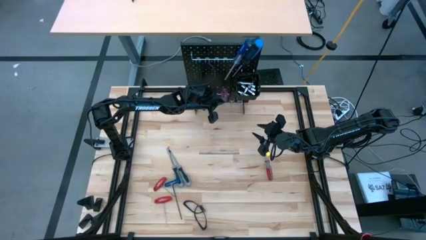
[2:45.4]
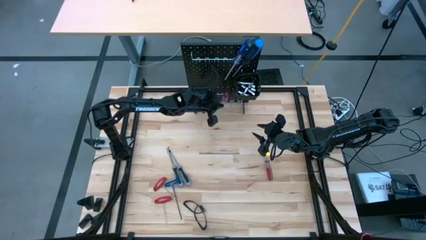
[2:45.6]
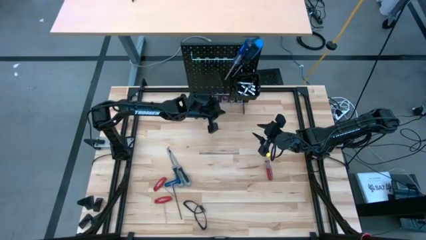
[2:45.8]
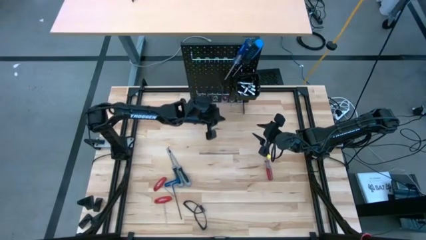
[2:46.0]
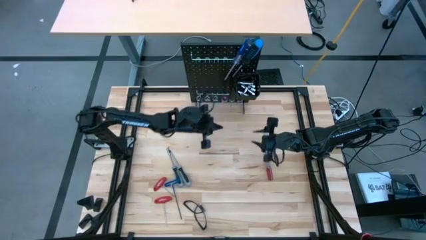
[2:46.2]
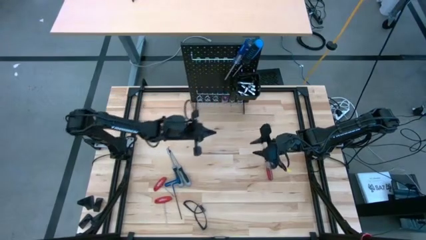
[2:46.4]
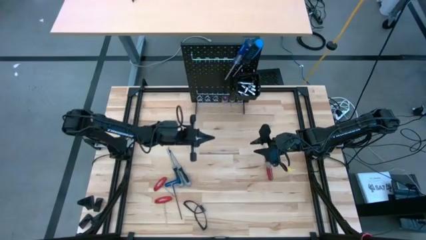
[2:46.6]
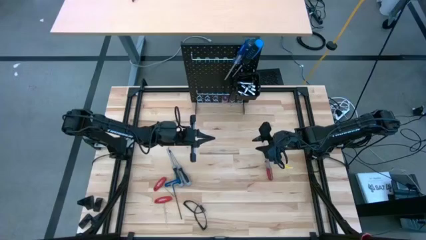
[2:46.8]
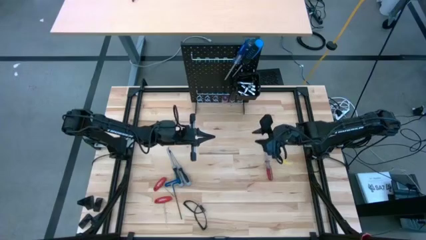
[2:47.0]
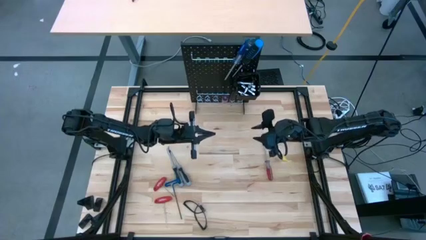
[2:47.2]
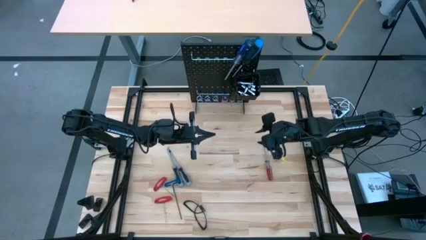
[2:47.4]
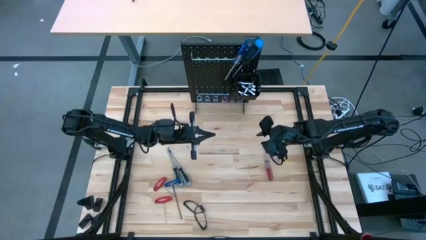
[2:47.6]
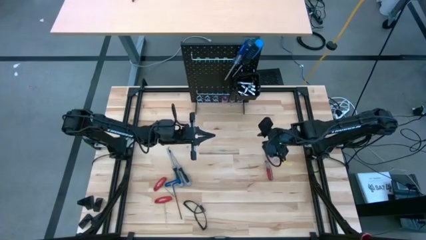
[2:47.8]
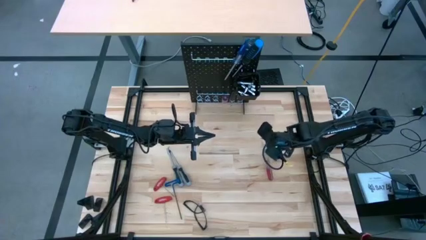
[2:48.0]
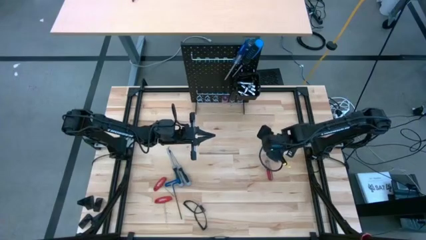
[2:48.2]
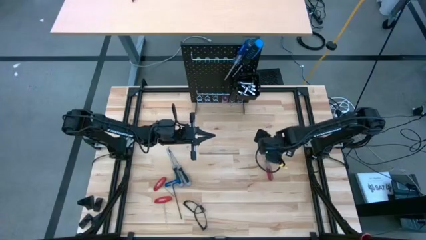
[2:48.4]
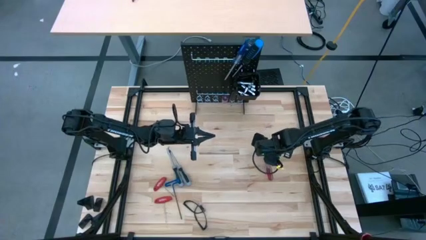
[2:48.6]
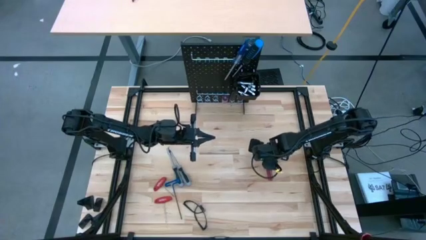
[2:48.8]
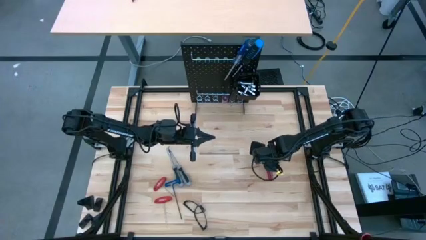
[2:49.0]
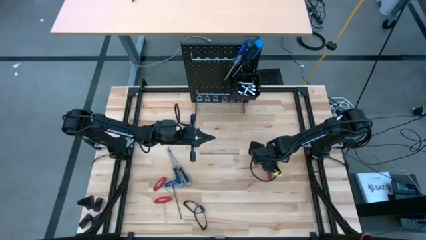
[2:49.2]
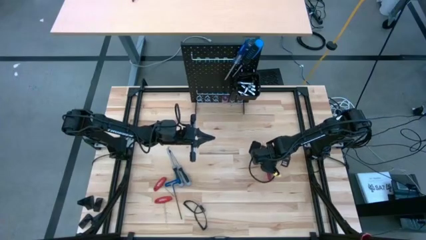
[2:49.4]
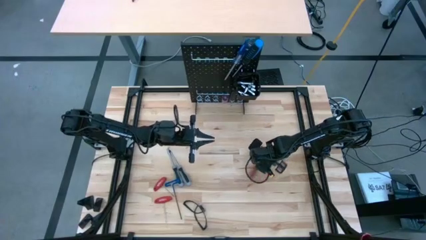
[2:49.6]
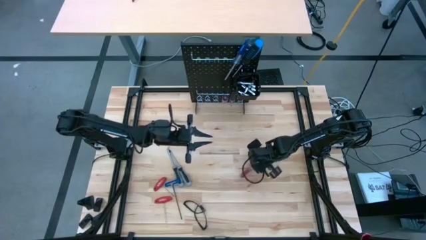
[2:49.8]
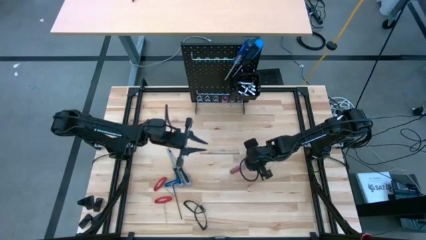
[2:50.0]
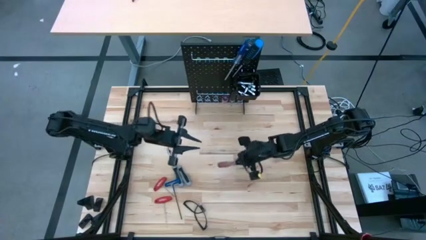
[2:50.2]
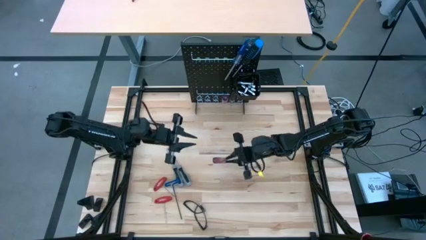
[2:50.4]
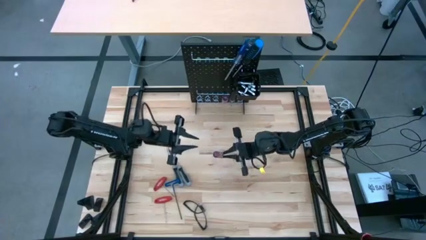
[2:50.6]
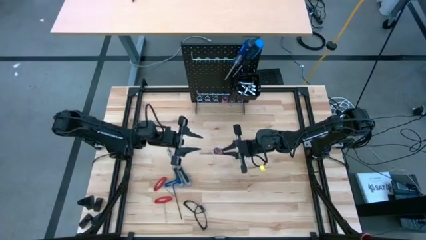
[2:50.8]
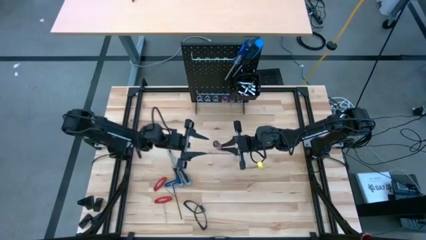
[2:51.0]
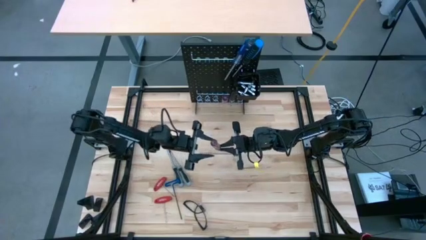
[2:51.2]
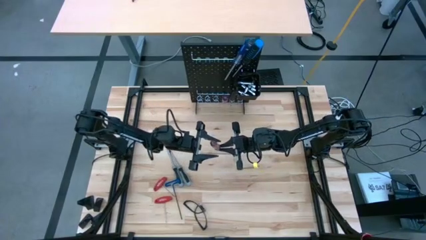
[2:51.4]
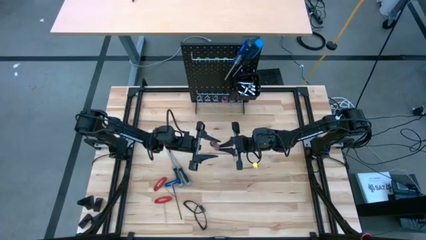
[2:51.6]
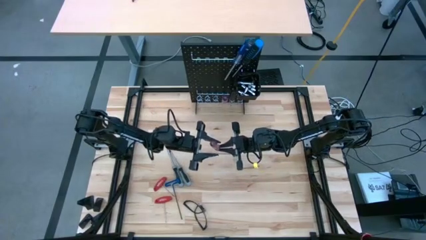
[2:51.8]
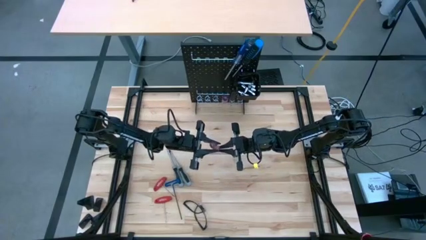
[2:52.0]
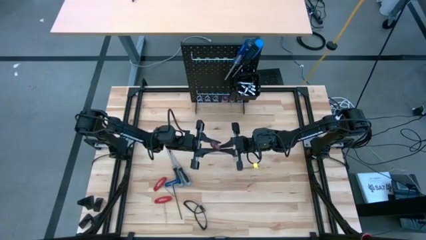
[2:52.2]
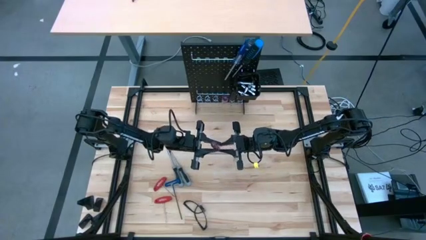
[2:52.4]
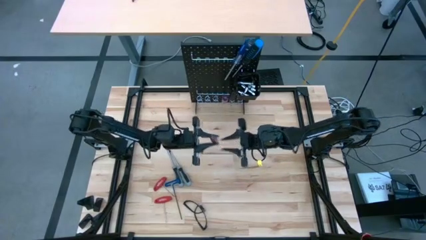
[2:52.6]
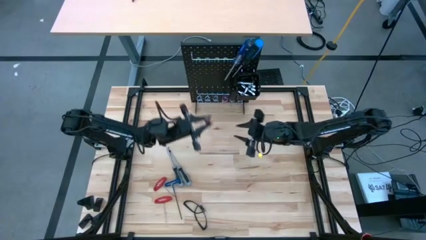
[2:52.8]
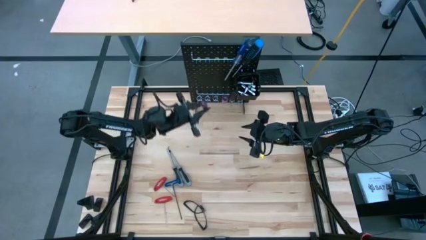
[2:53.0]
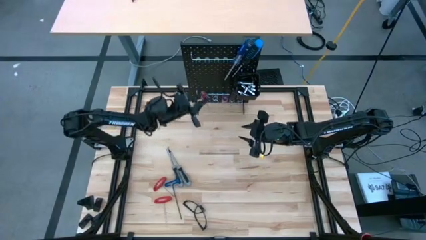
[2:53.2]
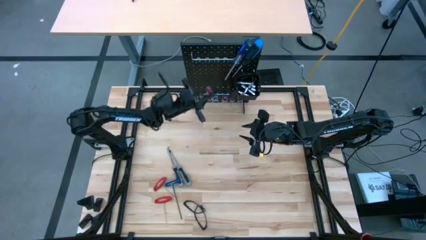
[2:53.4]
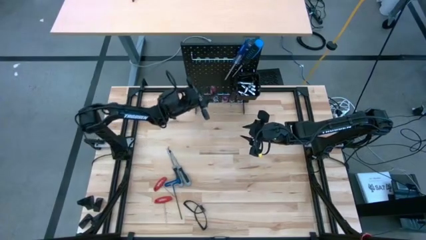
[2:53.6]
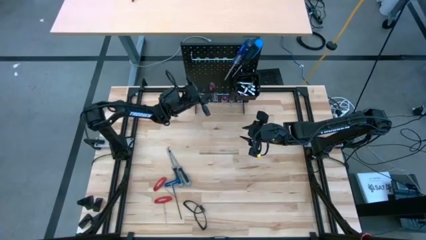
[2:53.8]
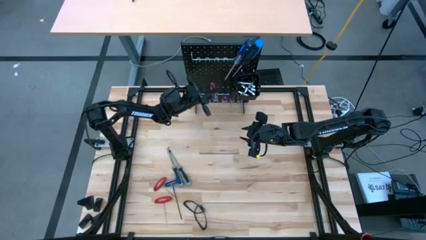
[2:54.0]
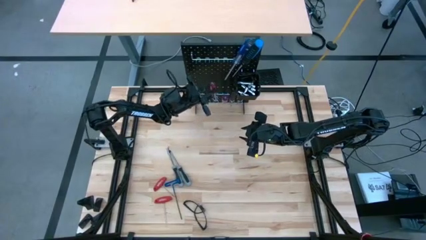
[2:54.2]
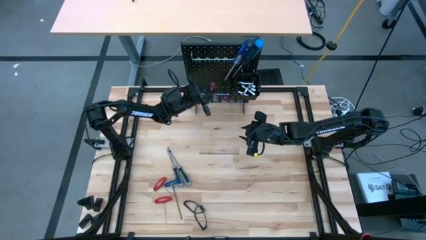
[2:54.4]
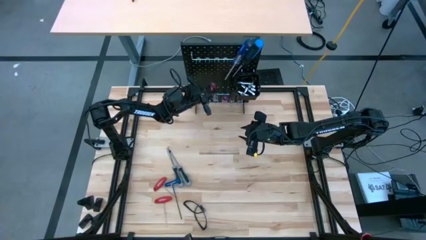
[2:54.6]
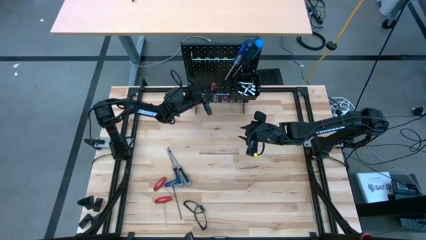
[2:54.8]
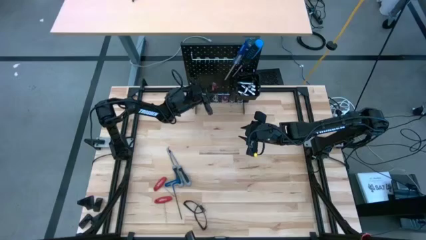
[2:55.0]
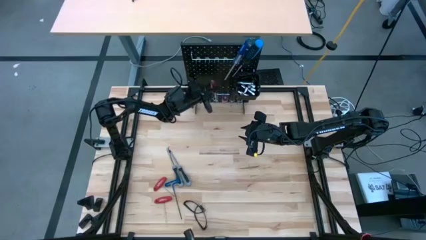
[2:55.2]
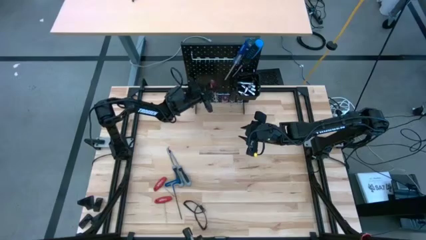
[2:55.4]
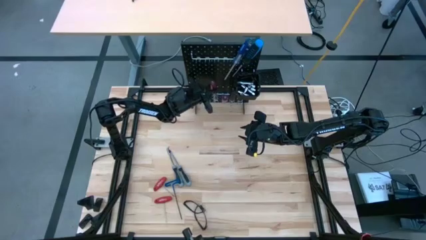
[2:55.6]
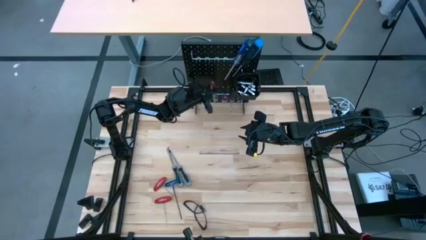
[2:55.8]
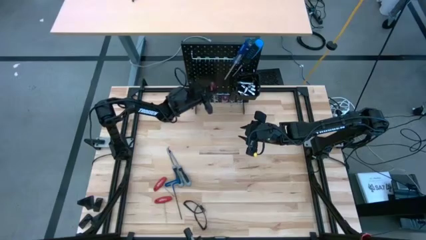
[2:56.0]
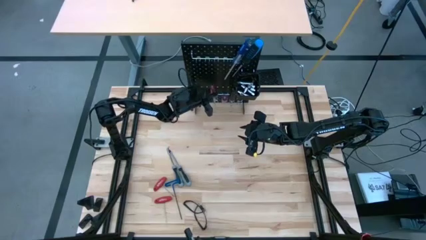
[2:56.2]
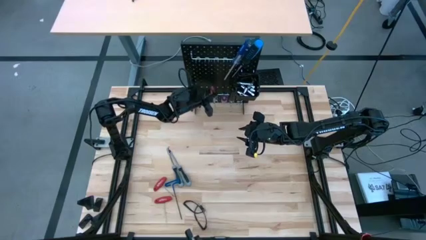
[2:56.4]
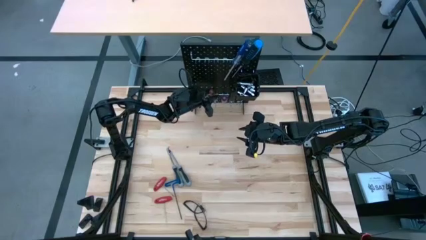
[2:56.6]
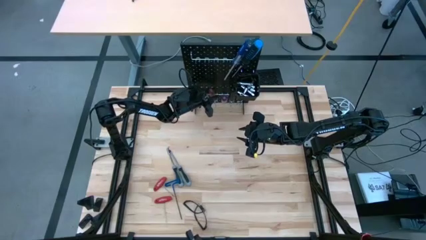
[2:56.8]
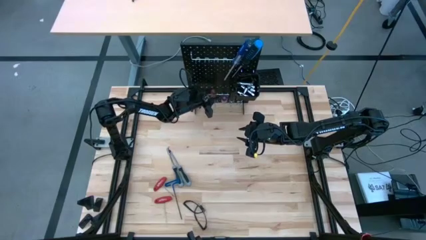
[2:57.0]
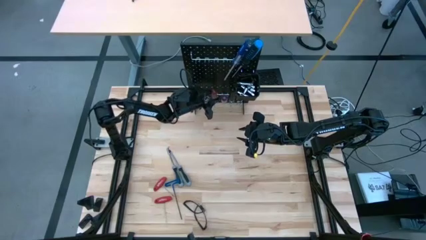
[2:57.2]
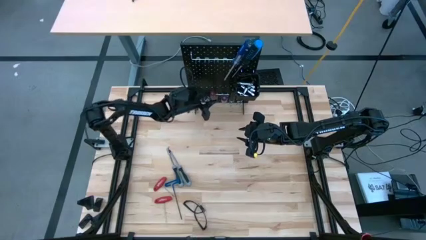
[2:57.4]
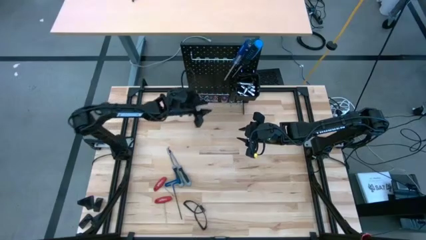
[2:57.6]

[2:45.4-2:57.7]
Task: Hang tools onto peg board
Hang the red screwdriver on the pegboard

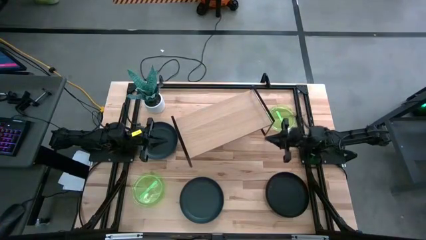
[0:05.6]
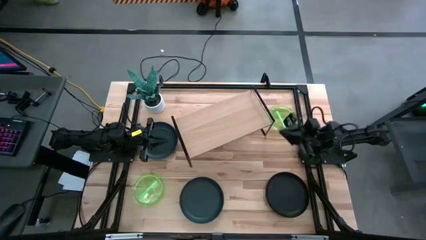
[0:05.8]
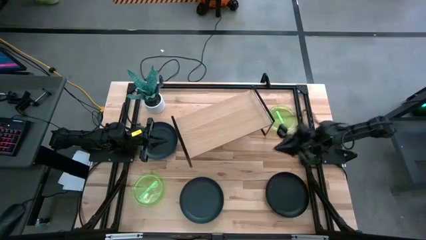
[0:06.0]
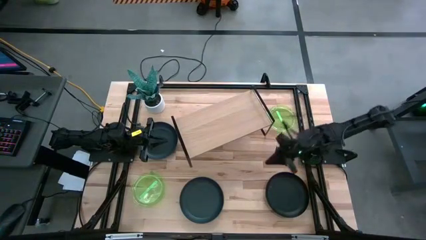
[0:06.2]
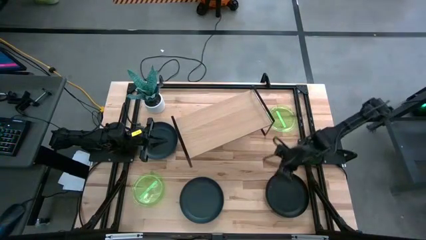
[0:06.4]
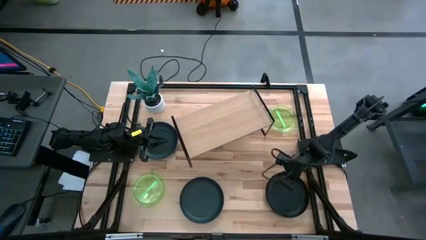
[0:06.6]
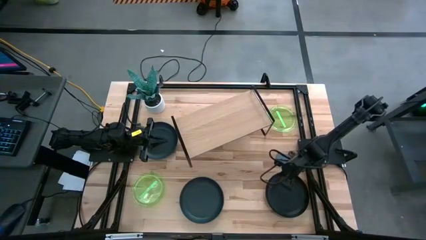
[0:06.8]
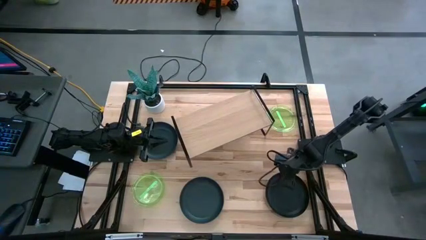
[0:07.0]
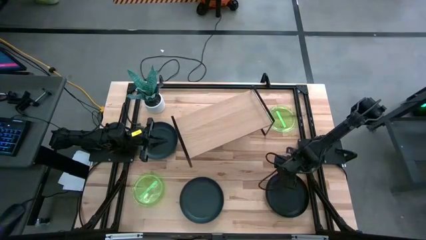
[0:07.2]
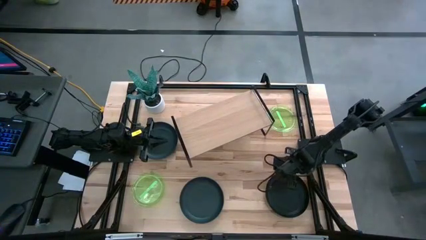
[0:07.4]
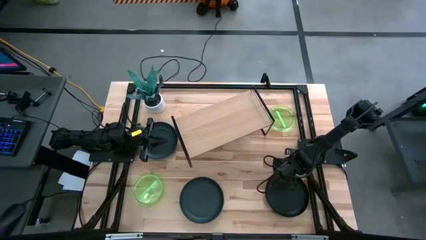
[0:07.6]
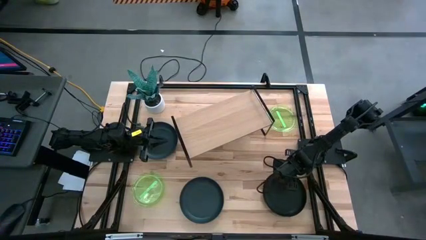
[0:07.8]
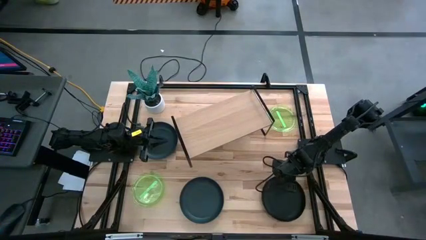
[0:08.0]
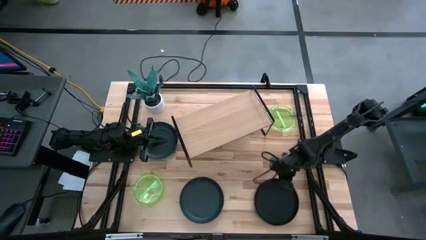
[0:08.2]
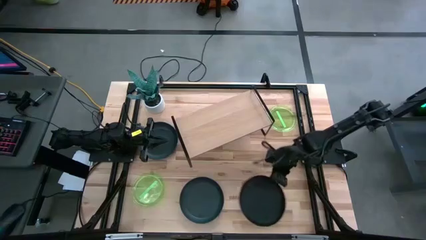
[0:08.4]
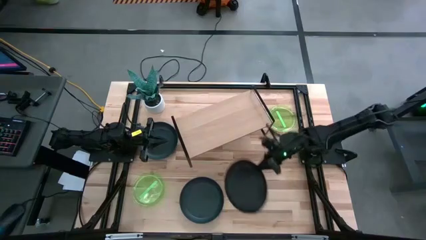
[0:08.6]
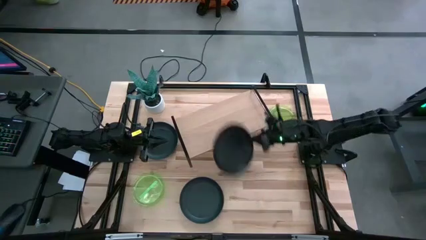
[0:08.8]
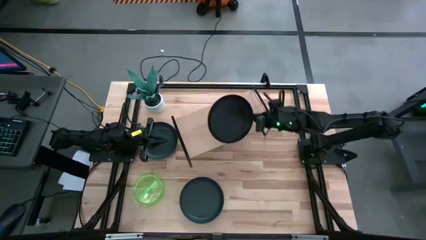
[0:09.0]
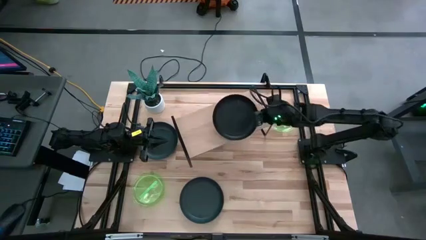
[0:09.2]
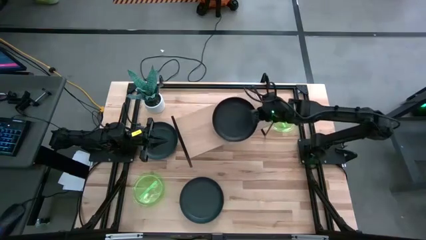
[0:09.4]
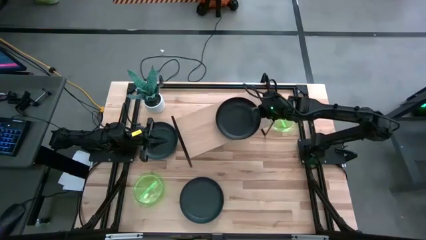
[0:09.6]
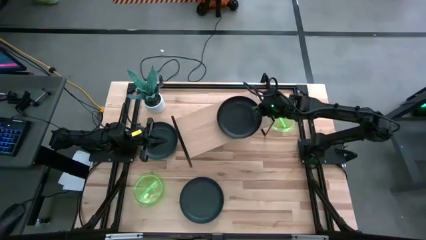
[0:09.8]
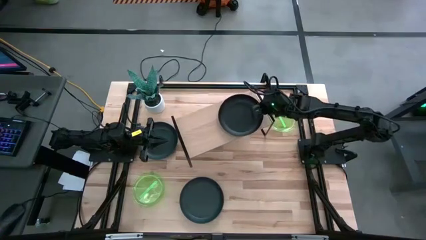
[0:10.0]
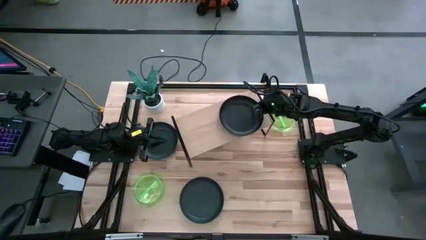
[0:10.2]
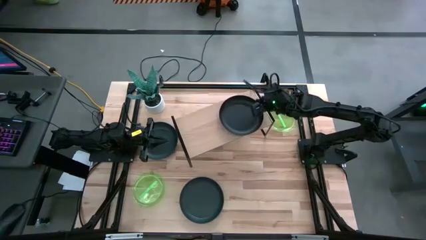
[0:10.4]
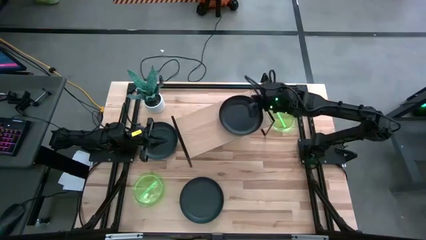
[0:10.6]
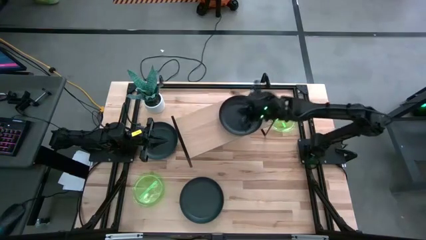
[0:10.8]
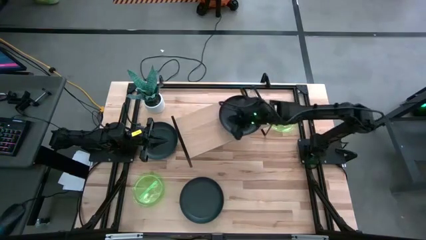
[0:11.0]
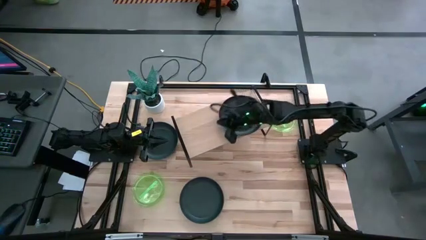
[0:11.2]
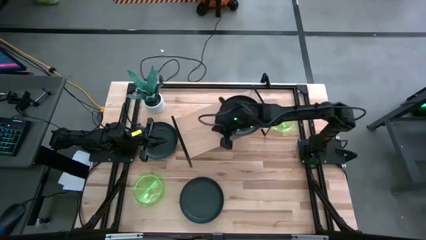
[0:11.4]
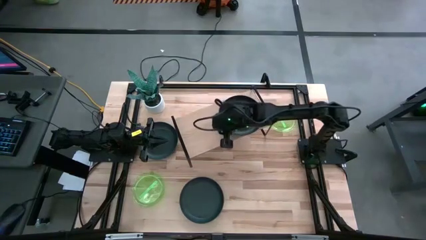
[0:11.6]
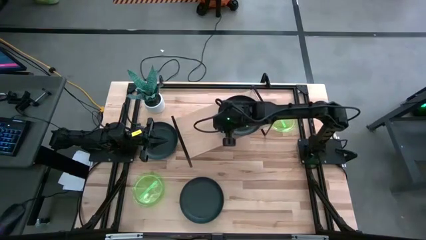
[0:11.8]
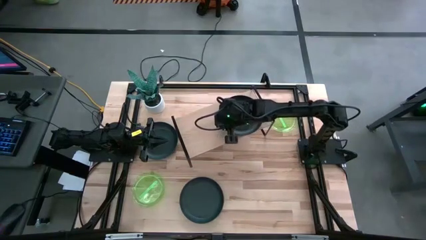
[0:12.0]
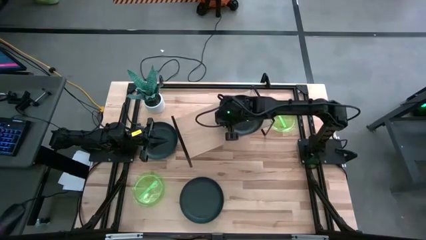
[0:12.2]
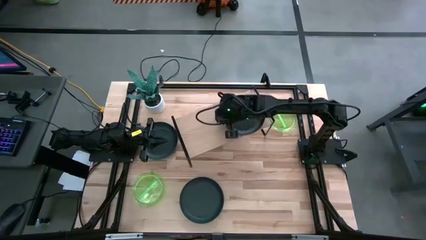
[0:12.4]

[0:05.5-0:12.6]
Task: Place and stack plates onto a shelf
Put the bottom right black plate on the shelf
